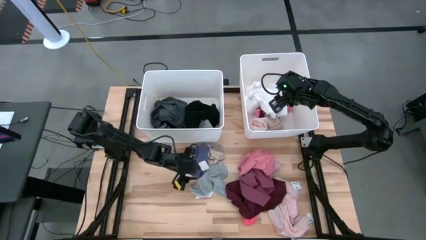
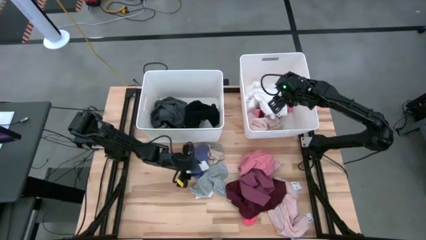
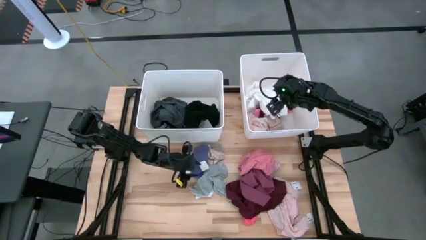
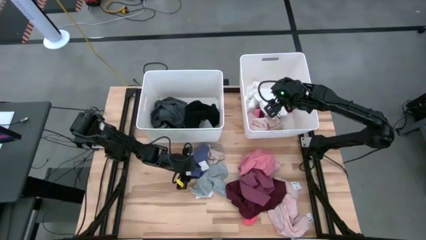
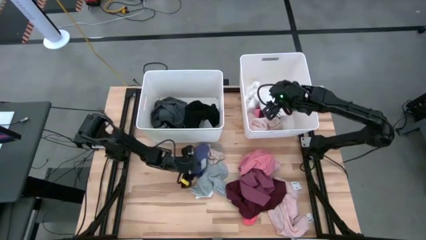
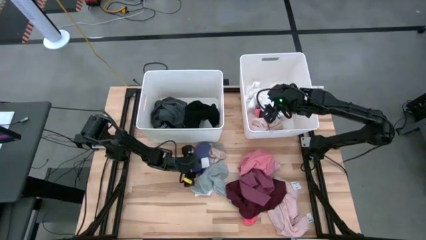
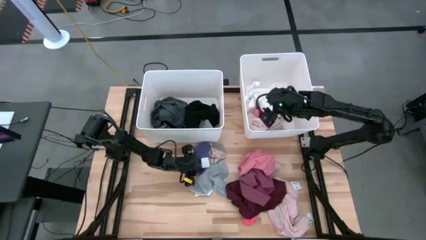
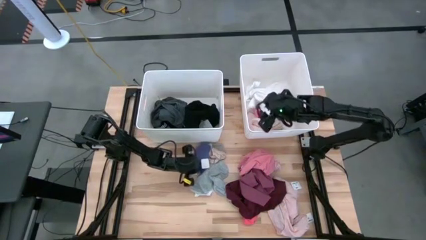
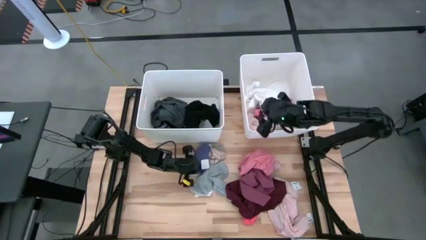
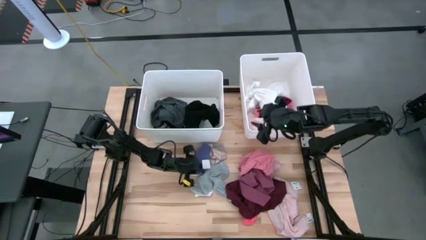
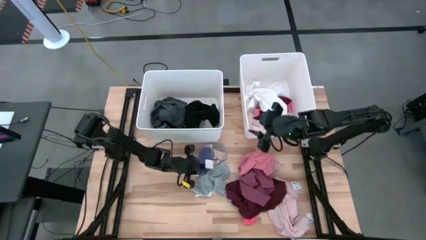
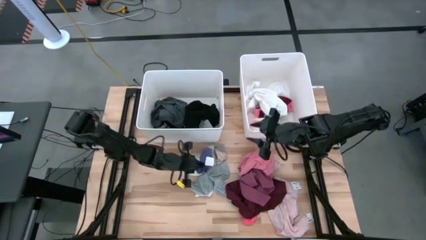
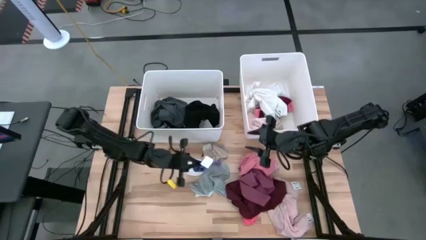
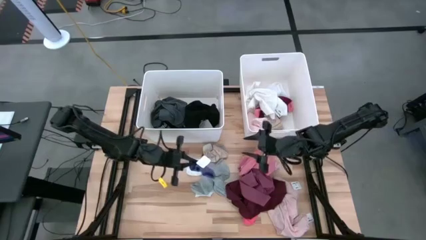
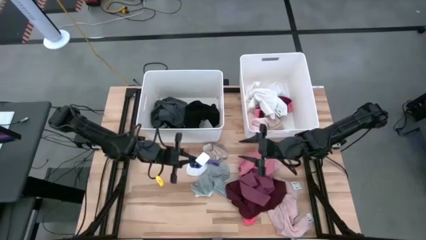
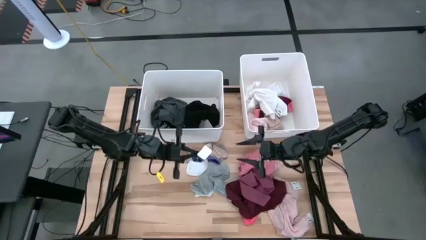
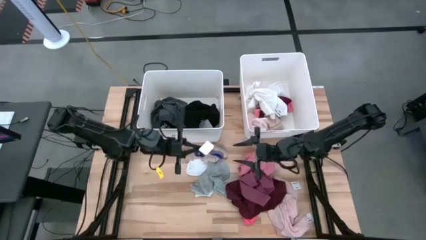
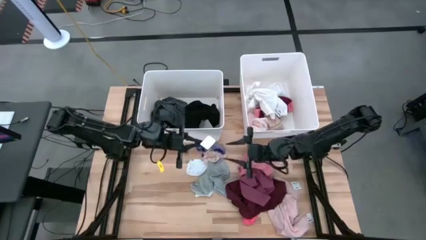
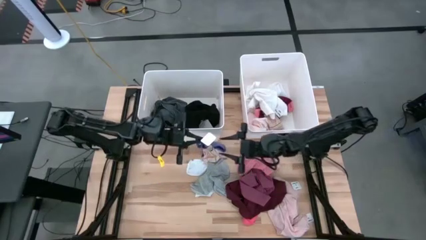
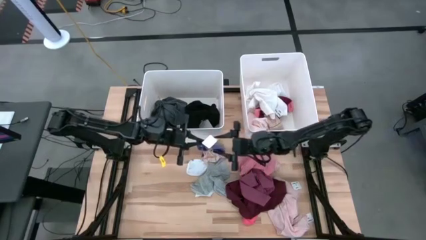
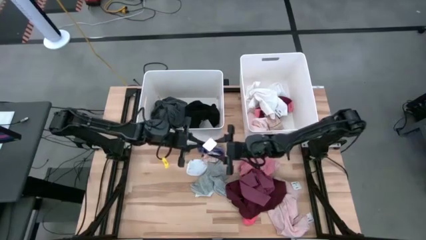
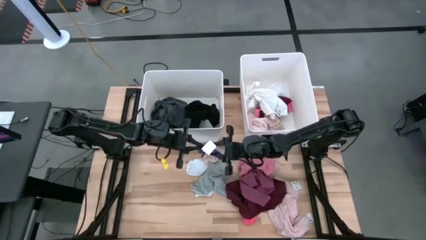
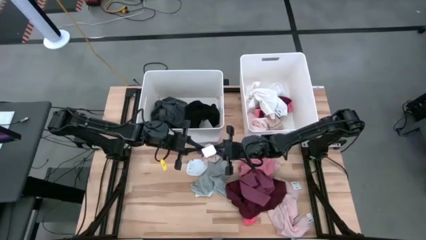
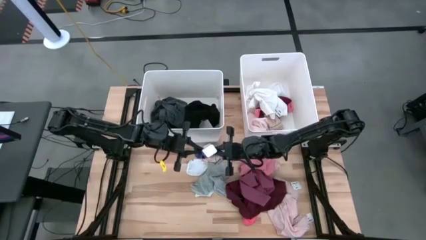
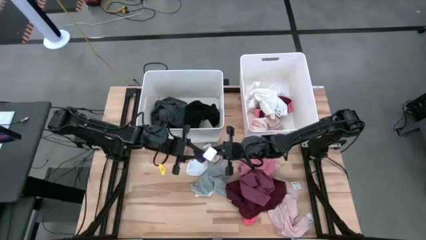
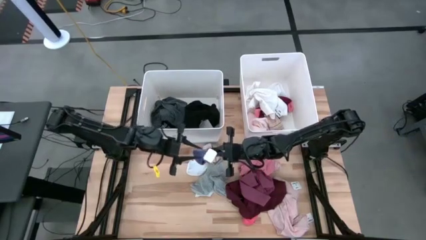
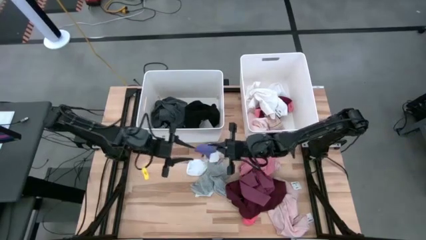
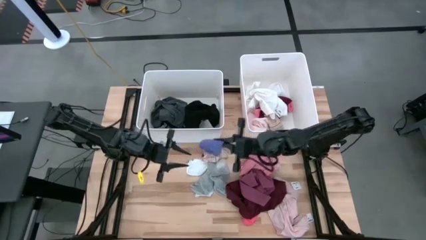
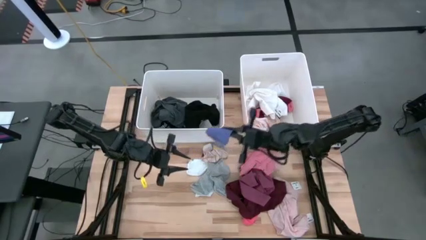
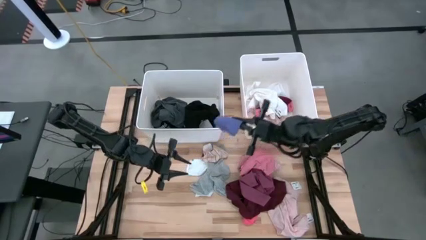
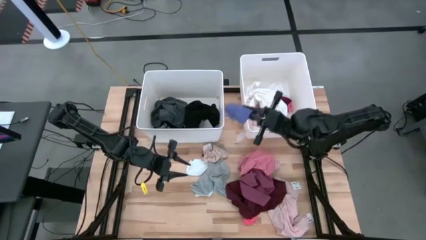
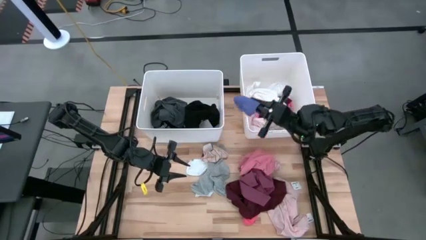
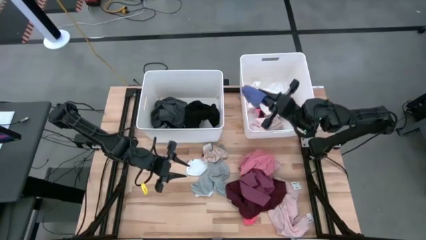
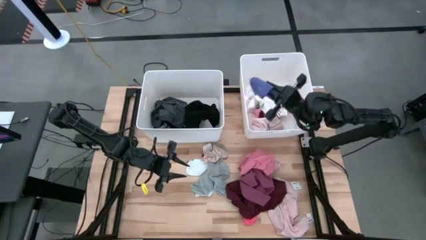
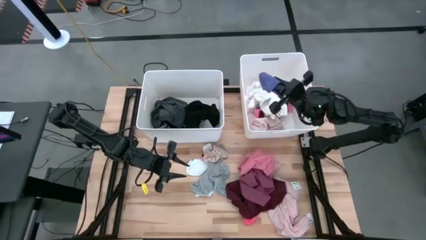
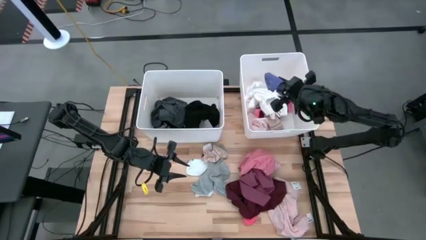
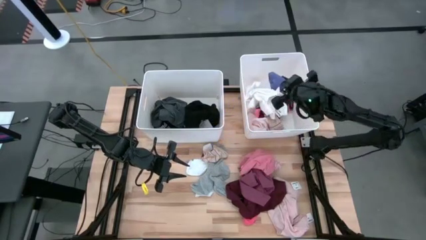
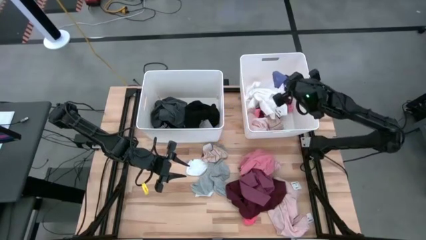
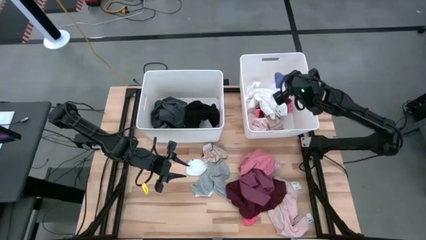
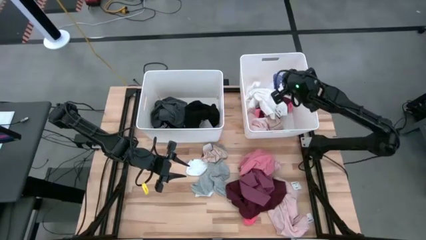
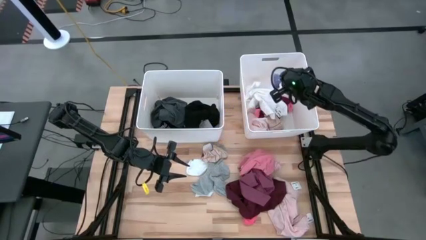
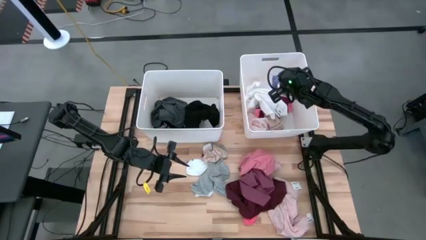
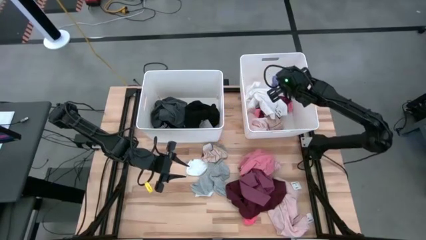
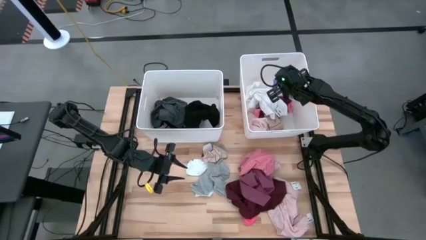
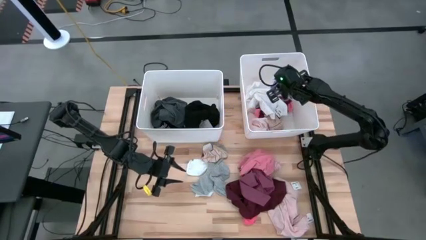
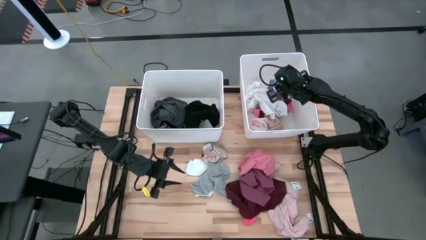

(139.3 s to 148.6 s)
Task: Sort clothes
Put the blue sock into the right white laundry organizer

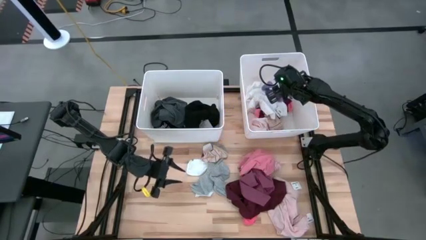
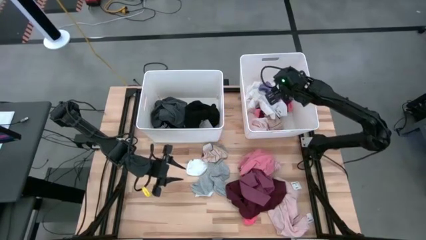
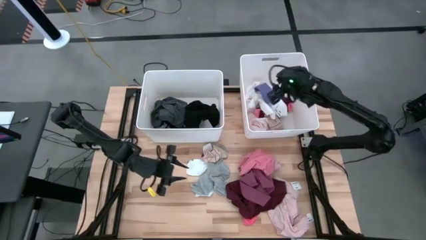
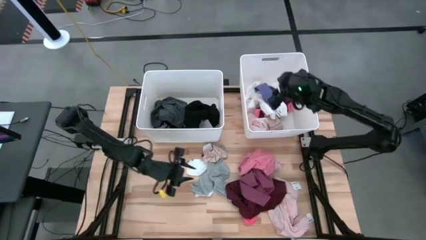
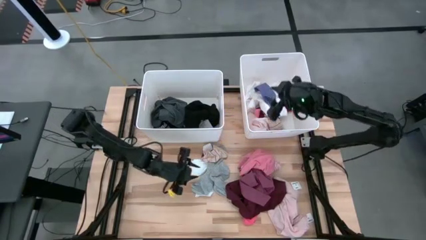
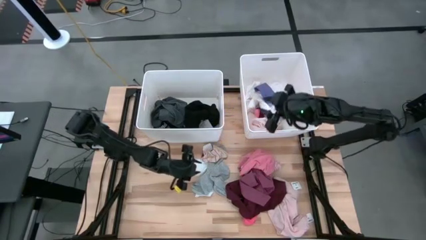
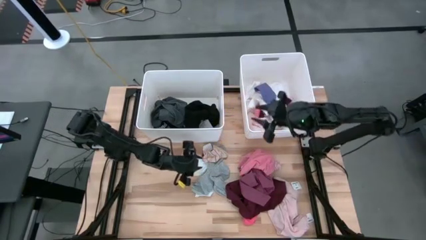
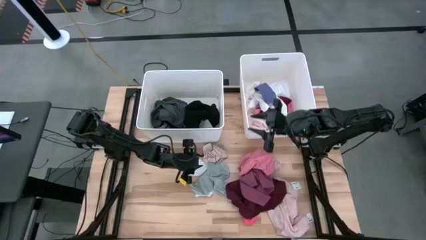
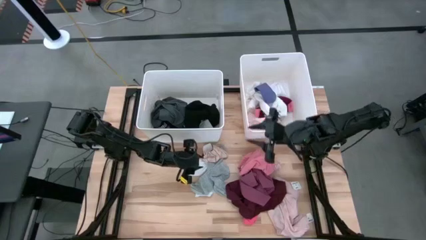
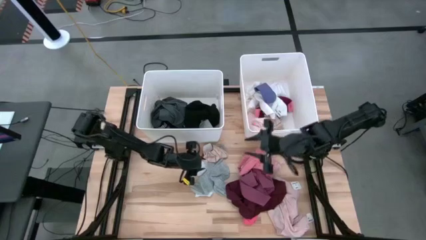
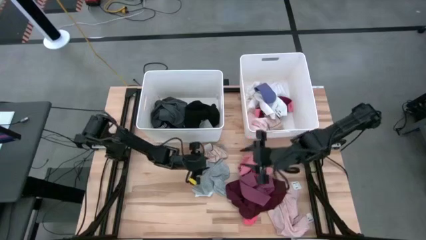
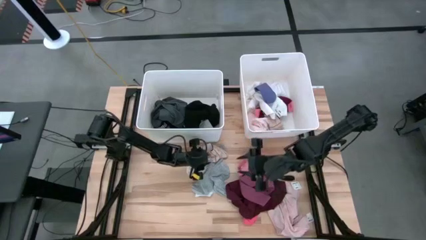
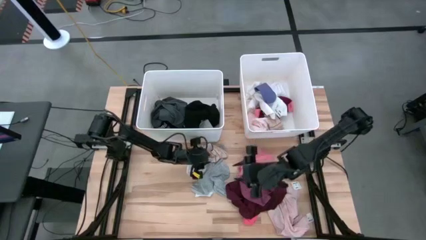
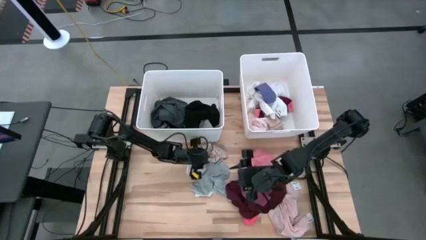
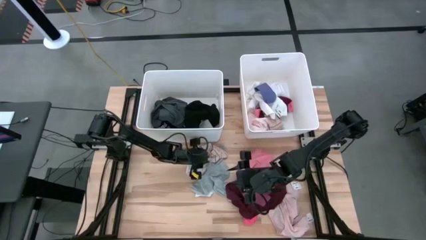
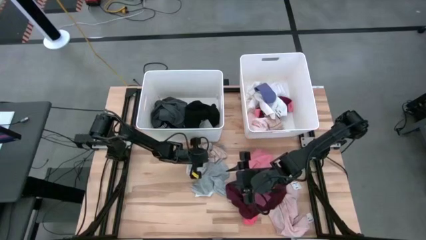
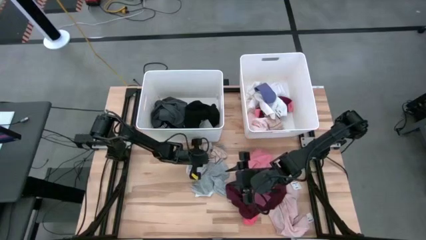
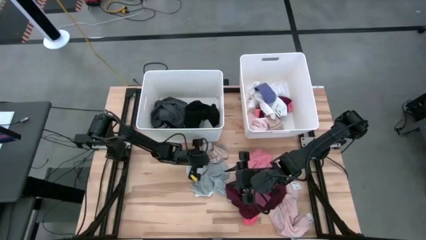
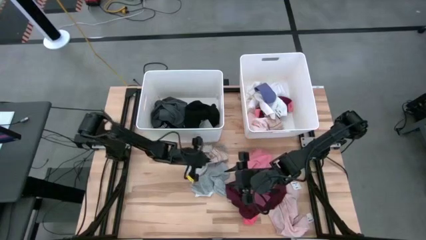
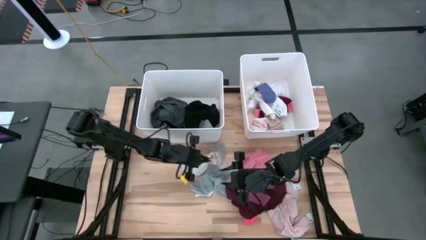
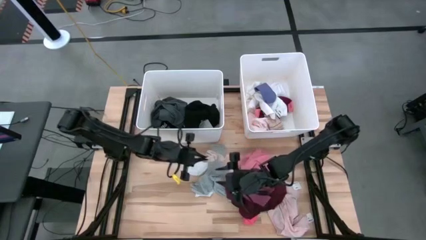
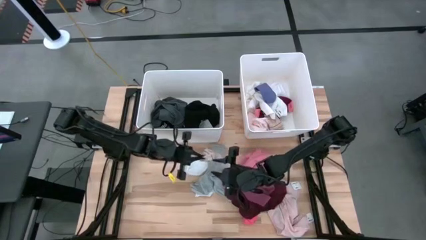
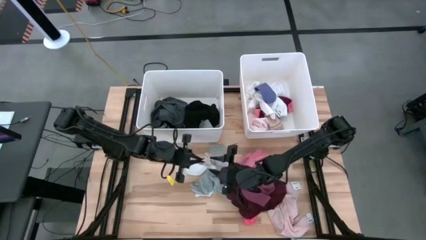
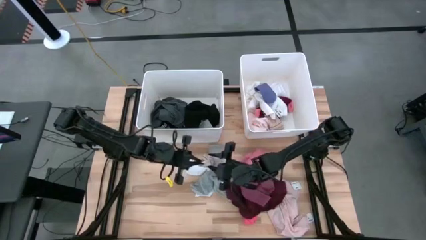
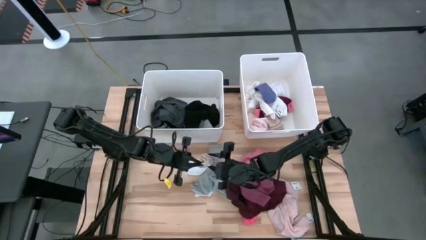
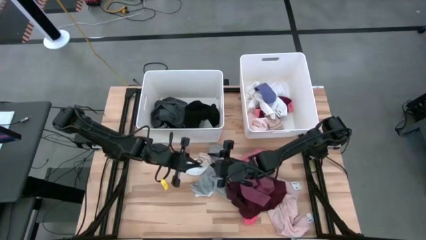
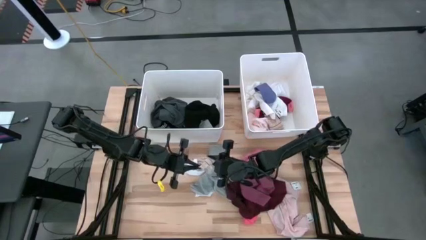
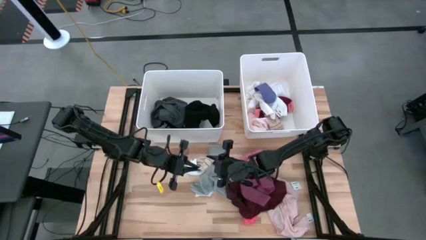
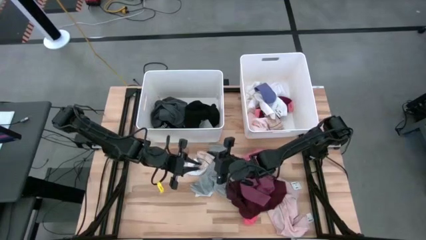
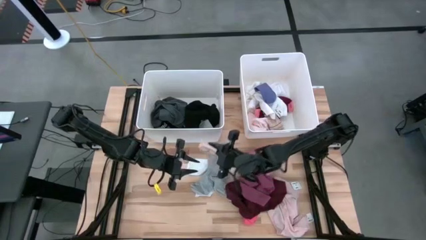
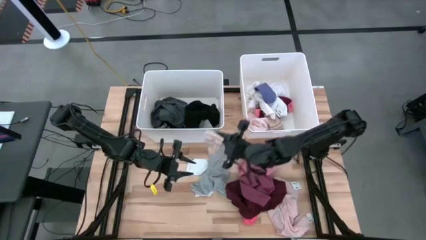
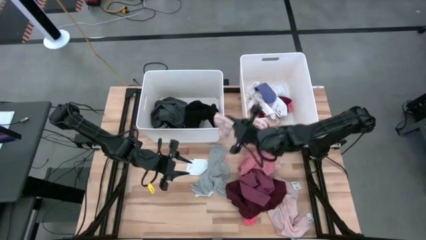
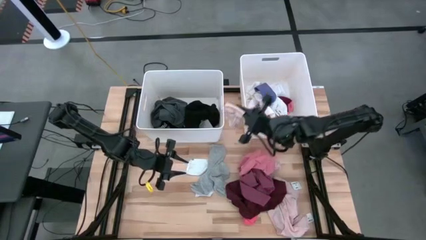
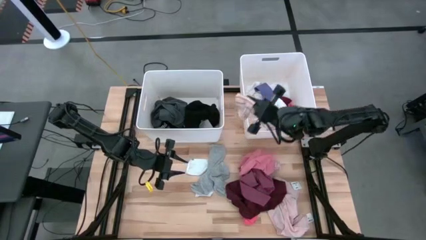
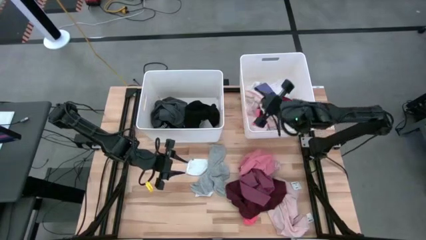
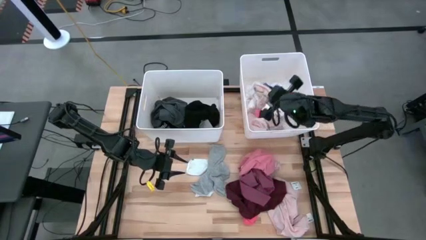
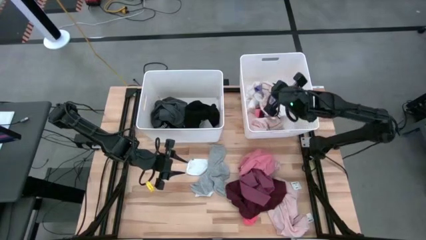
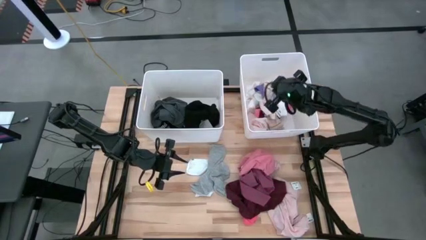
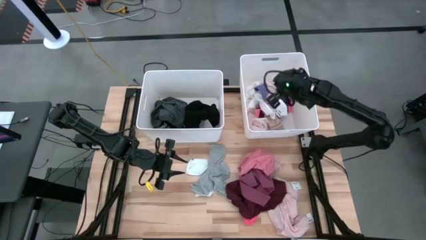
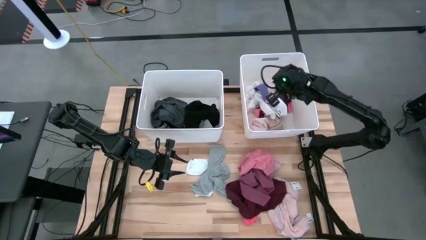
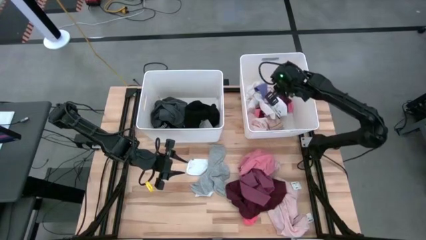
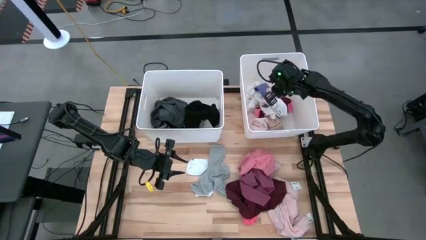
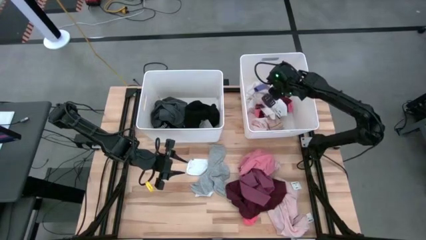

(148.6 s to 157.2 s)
Put the light orange sock into the right white laundry organizer
